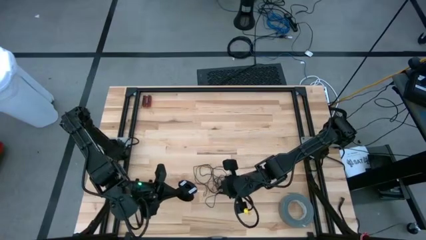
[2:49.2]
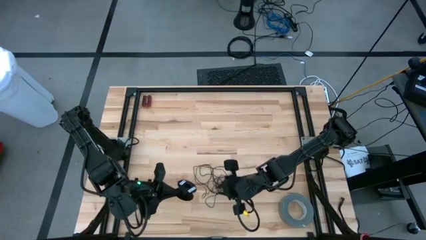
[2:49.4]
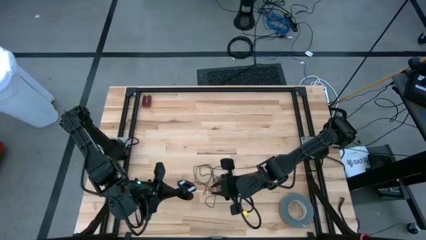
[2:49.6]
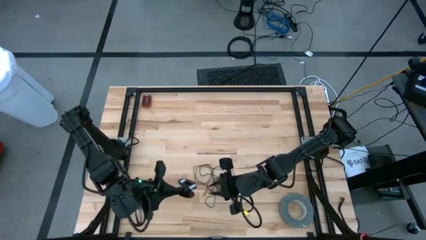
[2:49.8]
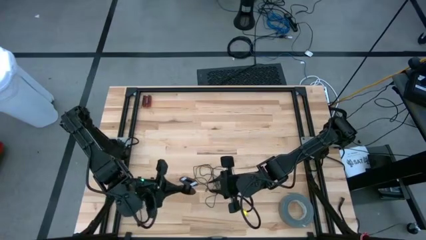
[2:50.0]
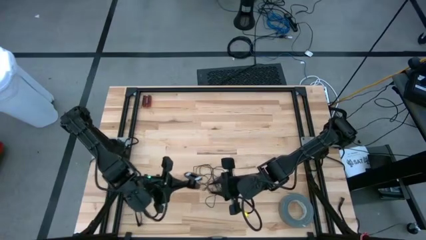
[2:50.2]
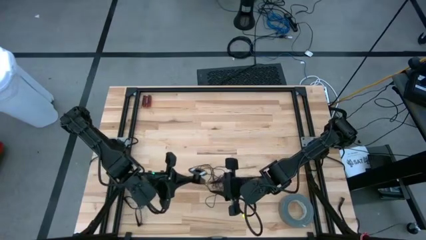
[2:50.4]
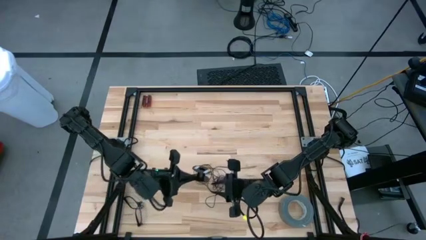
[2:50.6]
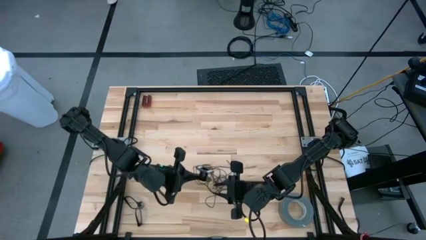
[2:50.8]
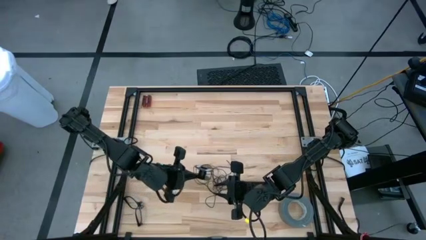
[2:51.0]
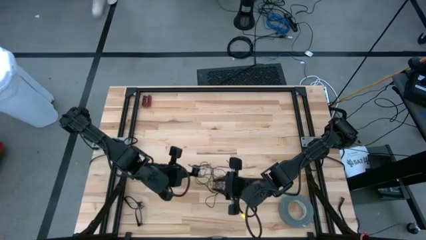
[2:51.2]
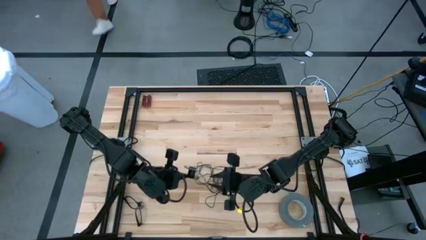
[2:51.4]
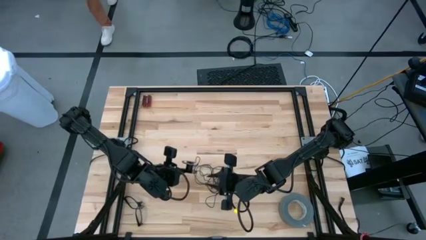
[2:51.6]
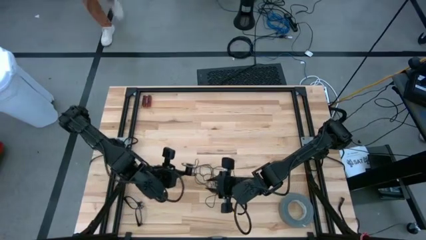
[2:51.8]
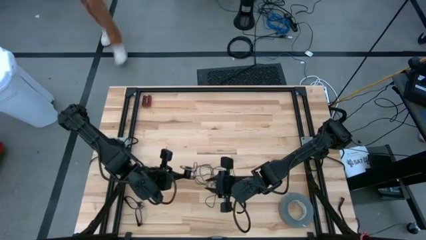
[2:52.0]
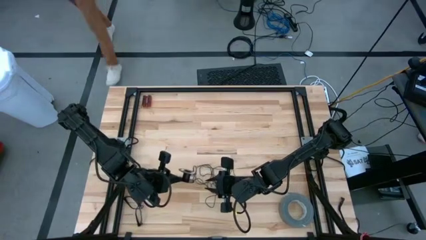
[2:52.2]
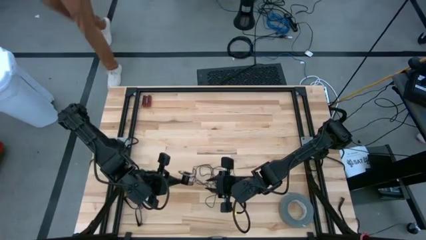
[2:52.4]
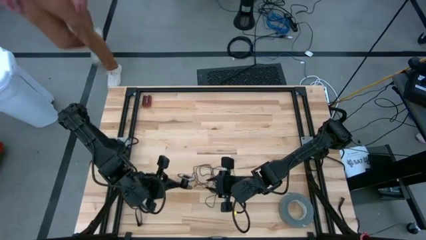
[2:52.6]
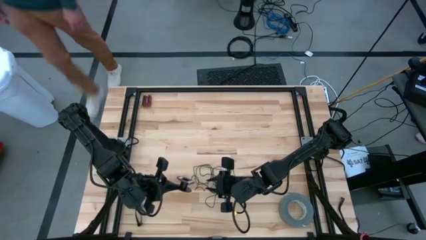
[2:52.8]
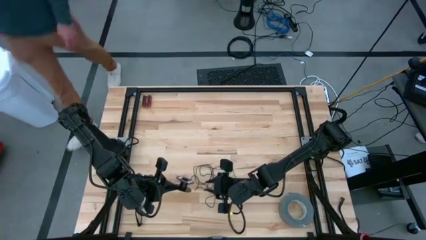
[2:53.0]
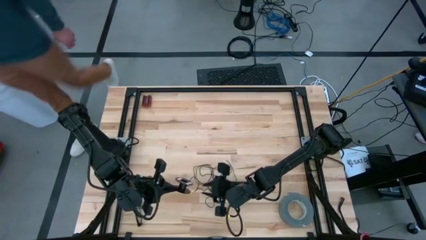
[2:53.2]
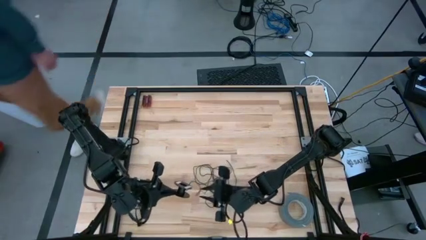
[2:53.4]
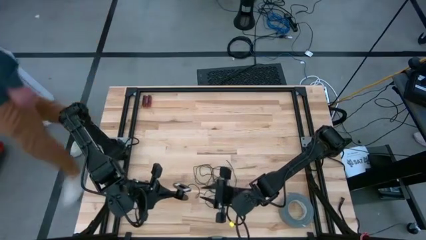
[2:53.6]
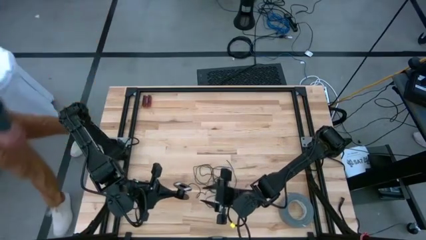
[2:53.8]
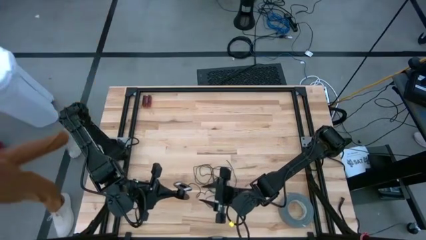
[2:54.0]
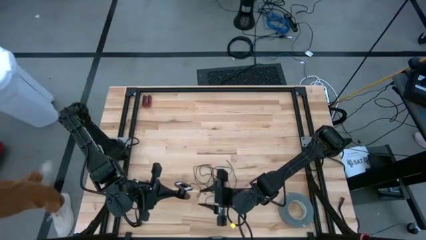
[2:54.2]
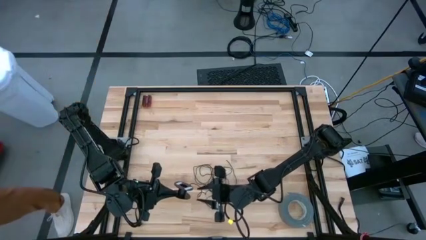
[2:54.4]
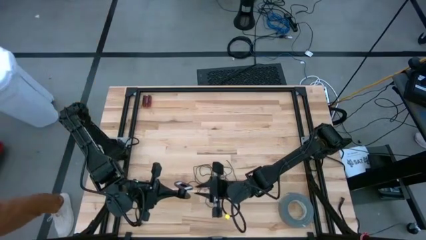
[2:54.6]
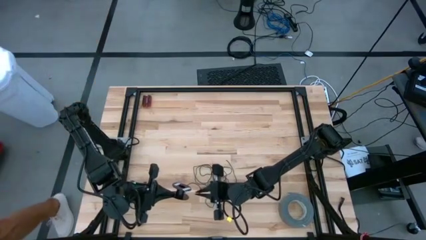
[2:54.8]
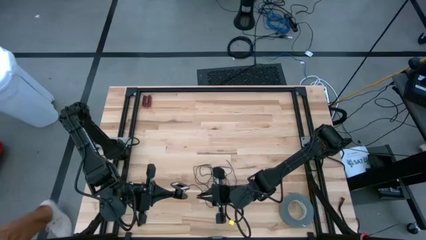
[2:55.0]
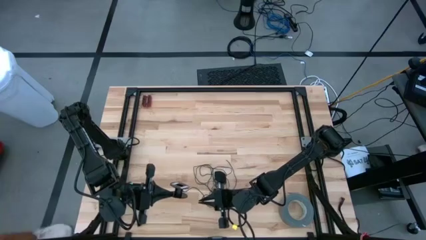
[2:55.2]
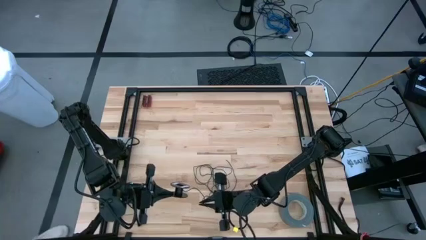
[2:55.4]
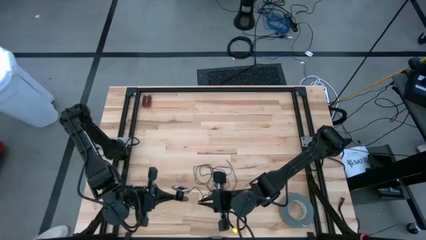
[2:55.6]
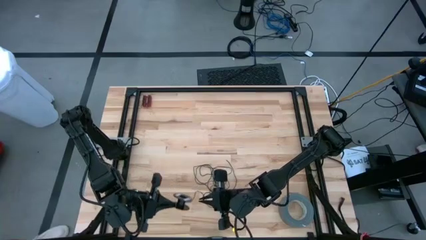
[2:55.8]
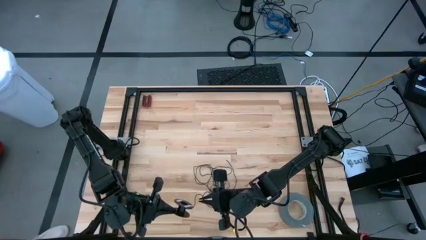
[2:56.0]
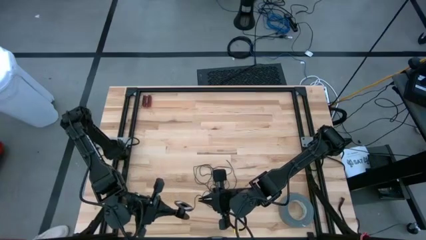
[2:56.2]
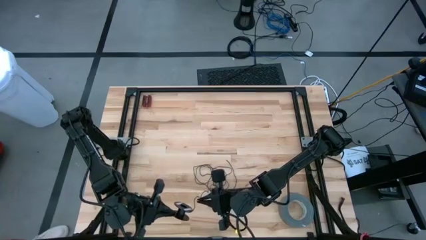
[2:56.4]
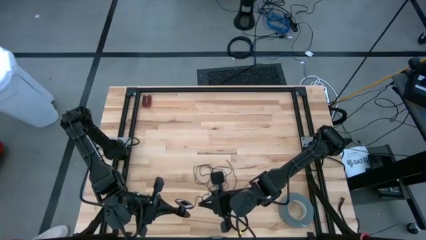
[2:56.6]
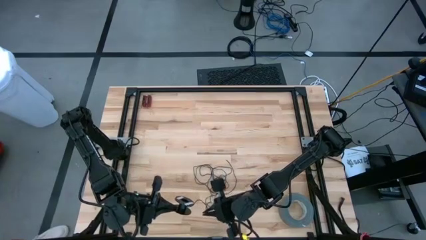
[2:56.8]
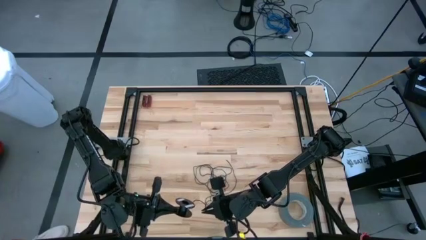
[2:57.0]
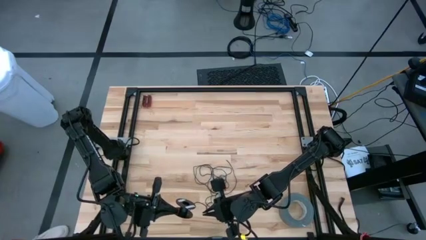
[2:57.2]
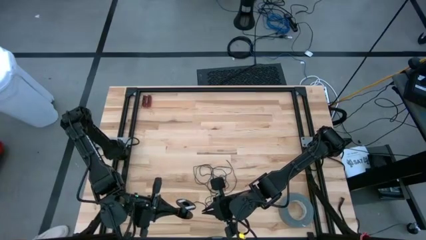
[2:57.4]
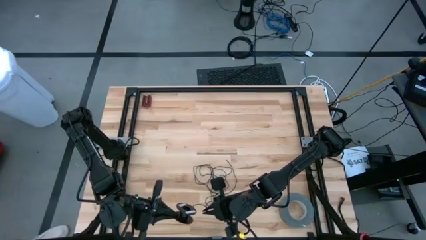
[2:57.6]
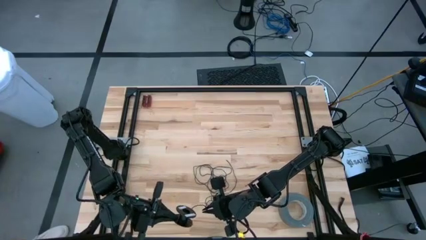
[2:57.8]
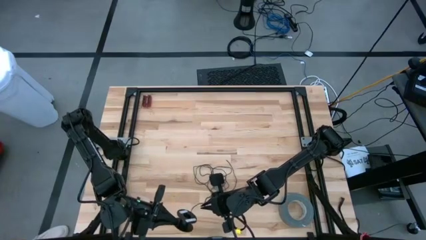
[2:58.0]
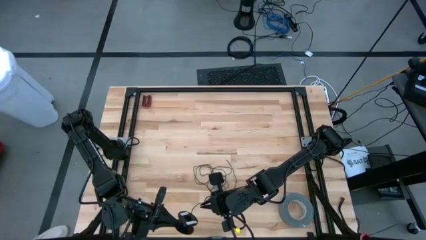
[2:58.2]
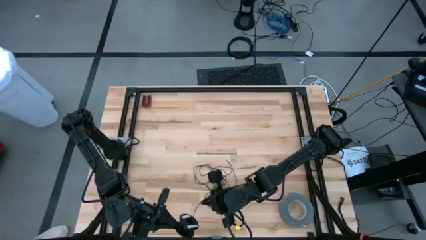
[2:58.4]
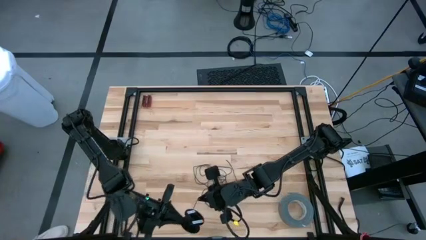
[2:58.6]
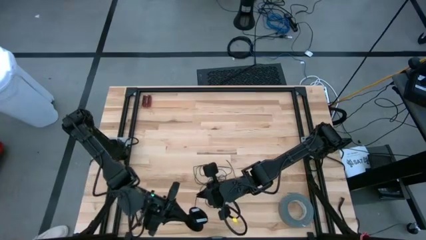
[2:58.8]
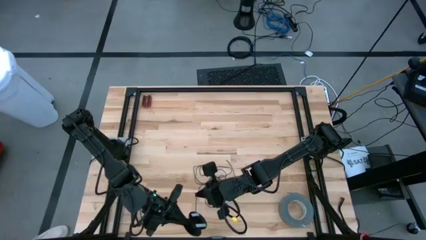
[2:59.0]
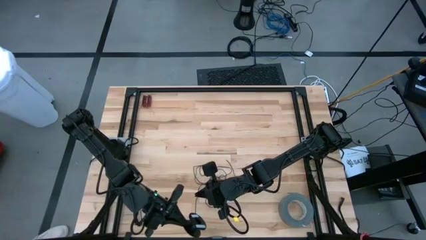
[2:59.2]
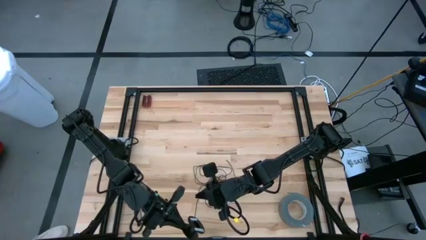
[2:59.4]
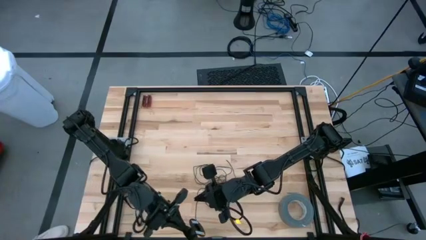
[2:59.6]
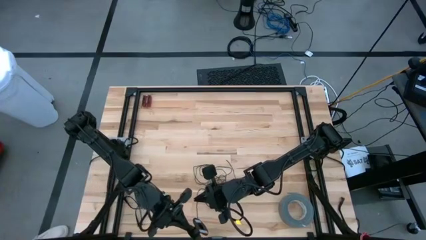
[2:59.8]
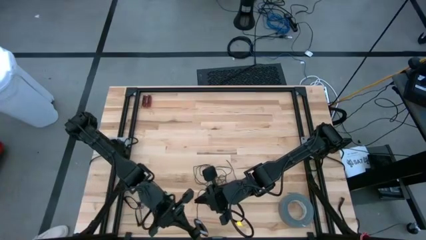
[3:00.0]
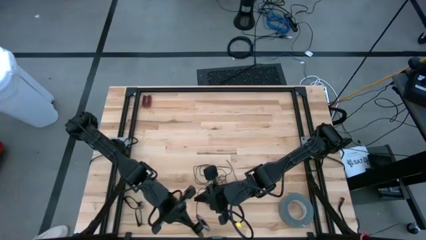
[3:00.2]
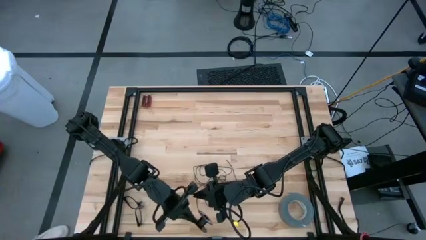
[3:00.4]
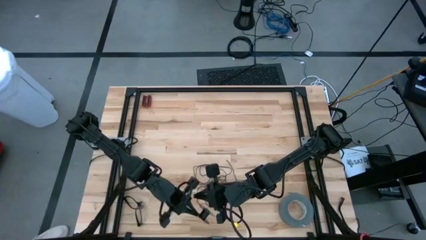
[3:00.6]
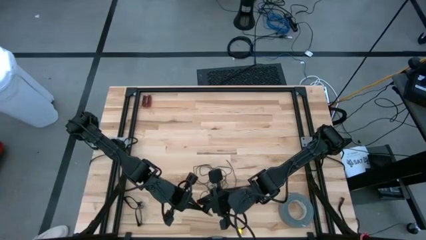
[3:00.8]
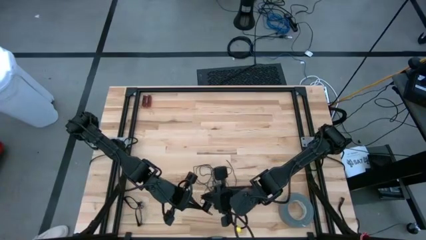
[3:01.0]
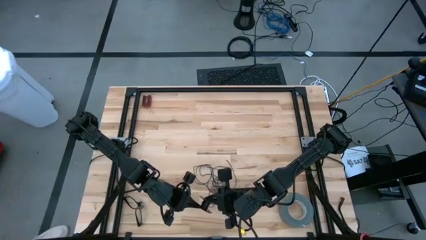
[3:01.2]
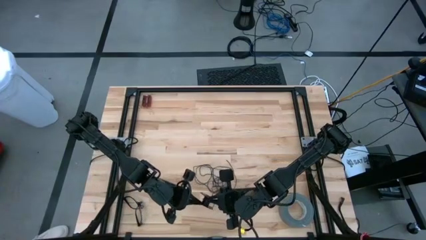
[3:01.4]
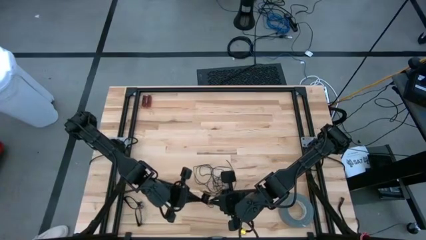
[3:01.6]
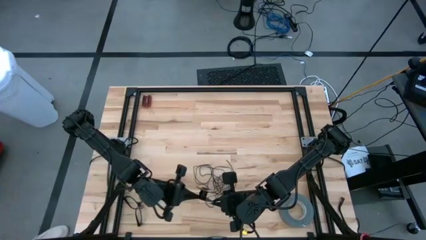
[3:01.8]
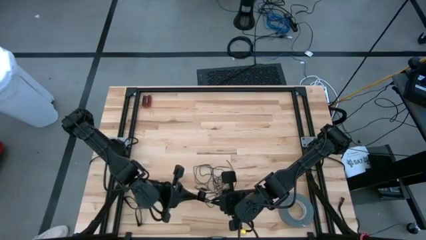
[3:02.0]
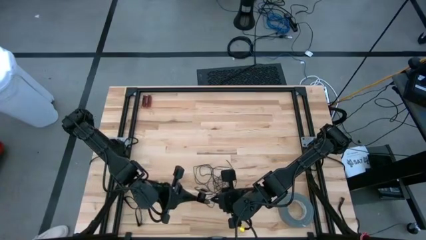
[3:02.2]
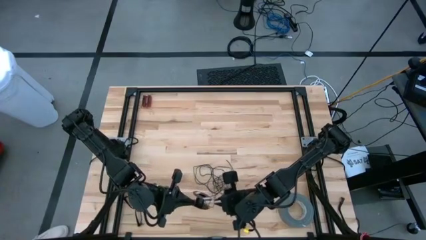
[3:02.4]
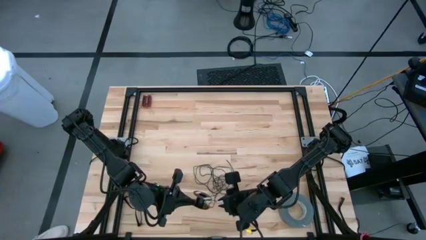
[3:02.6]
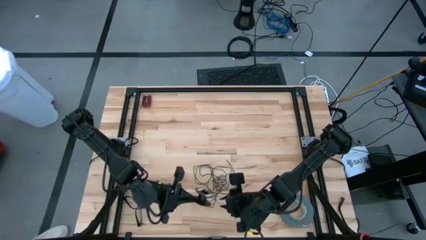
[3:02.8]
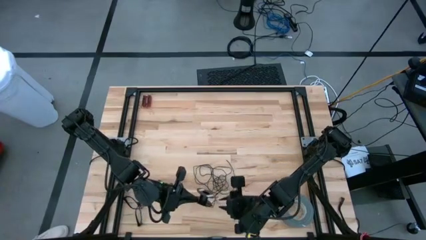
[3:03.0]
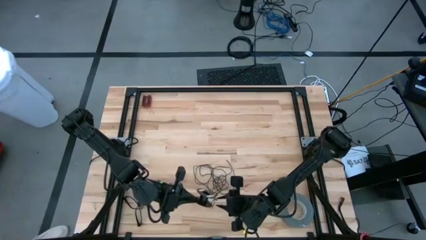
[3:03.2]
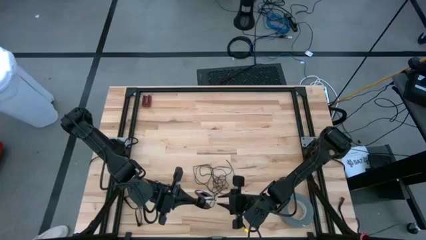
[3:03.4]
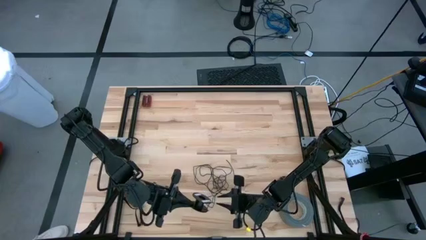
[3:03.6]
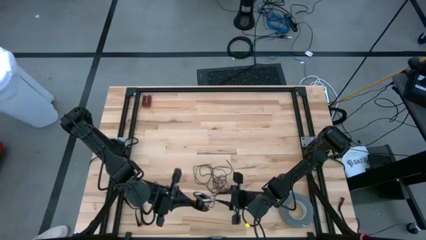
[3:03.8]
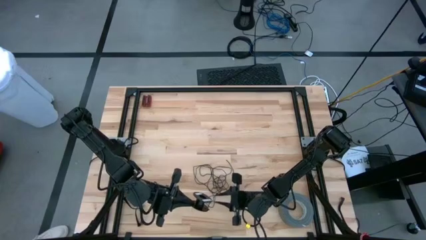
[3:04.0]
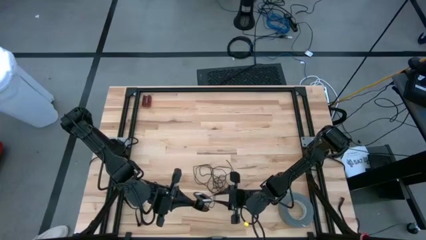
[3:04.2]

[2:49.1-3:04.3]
Task: Coil cords
Coil the black wire on the spool

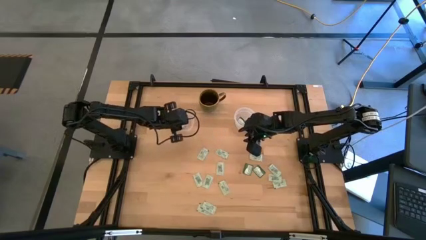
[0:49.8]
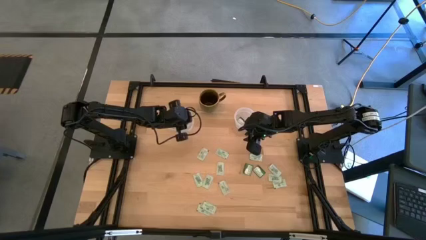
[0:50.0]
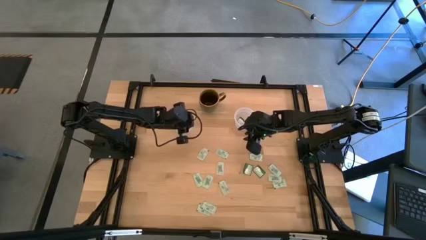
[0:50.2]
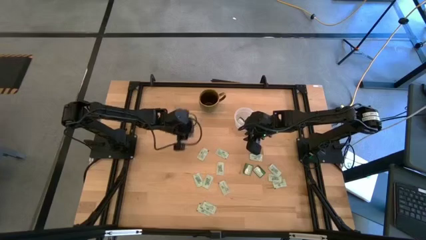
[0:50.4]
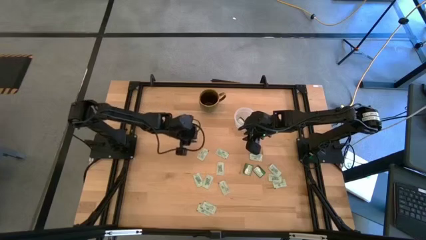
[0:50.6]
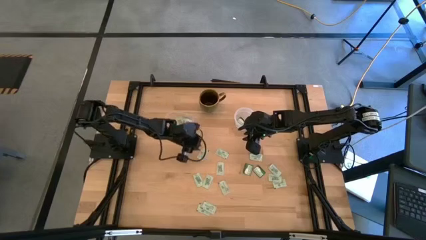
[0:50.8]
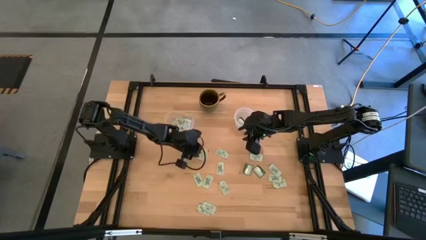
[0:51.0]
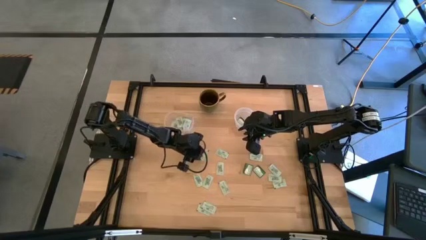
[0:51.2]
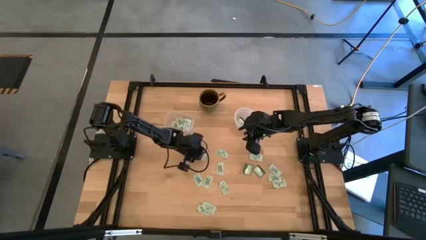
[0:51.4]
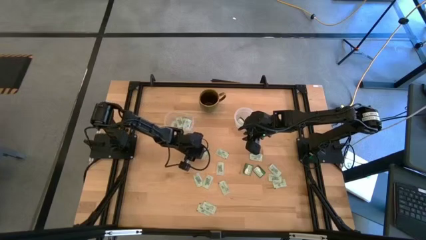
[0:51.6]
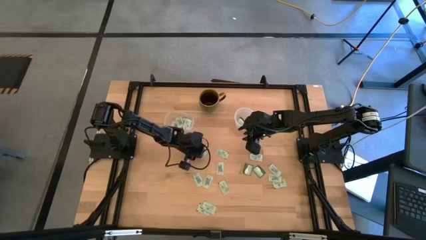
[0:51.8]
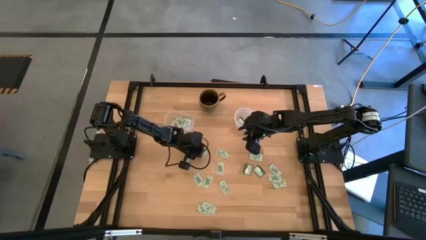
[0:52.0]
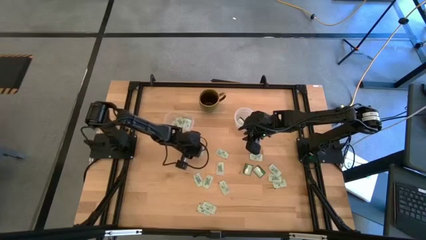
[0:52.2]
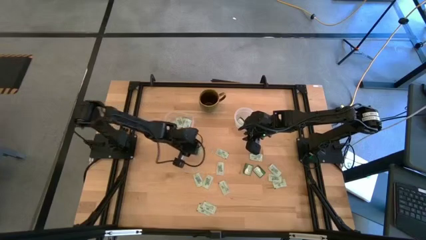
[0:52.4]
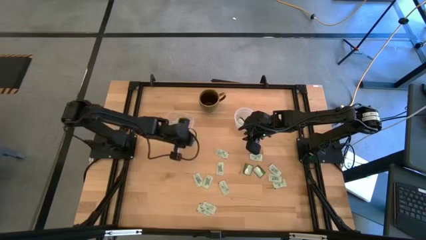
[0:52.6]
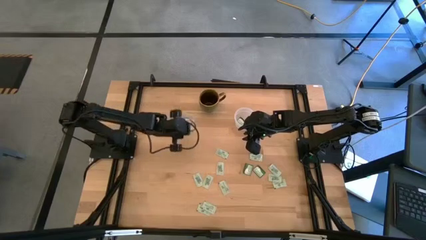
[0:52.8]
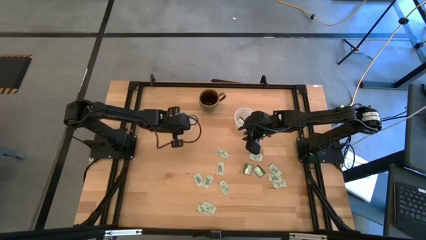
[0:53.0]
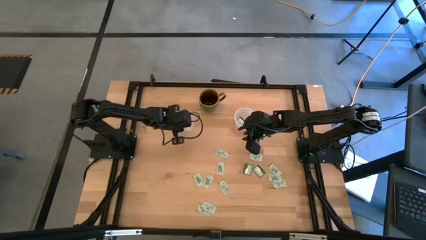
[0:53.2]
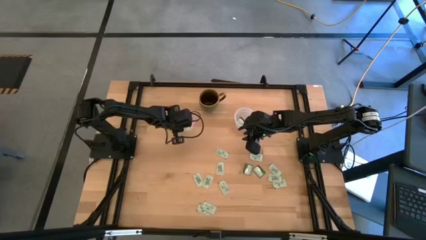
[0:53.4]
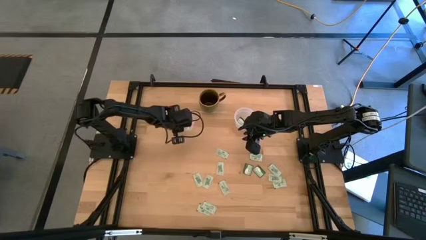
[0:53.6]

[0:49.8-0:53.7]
Task: Pick and place Stevia / Truvia into bins
Put the light green stevia packet into the left transparent container
